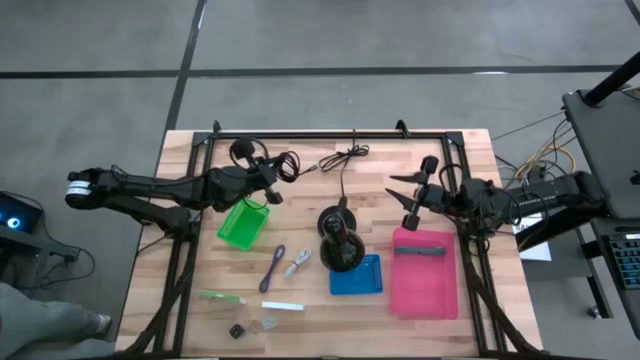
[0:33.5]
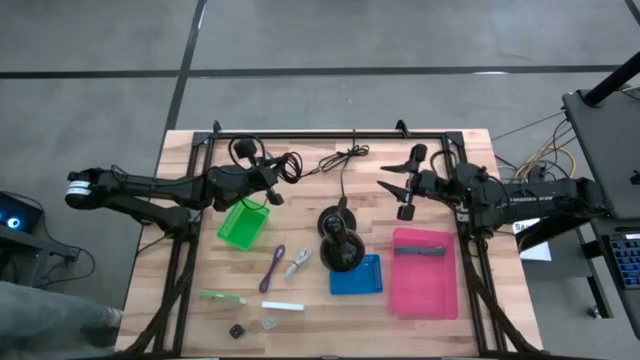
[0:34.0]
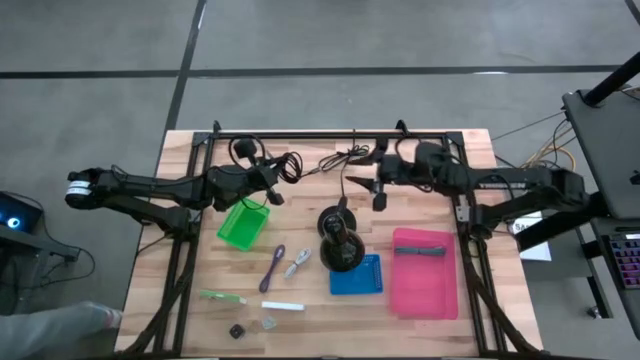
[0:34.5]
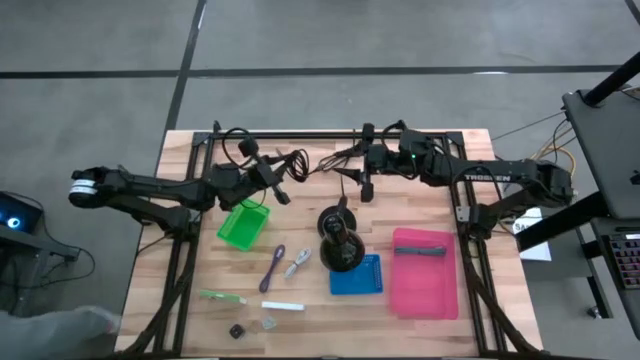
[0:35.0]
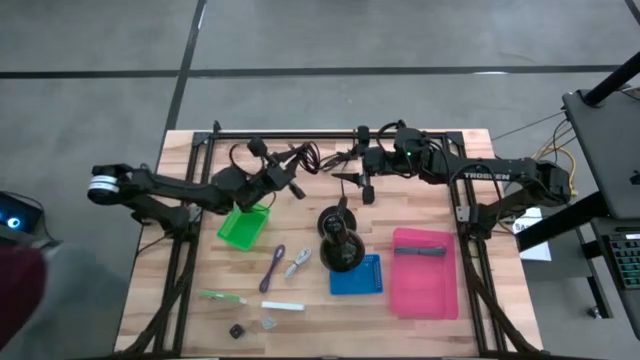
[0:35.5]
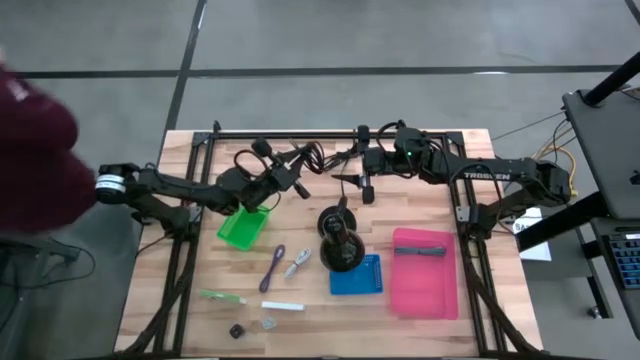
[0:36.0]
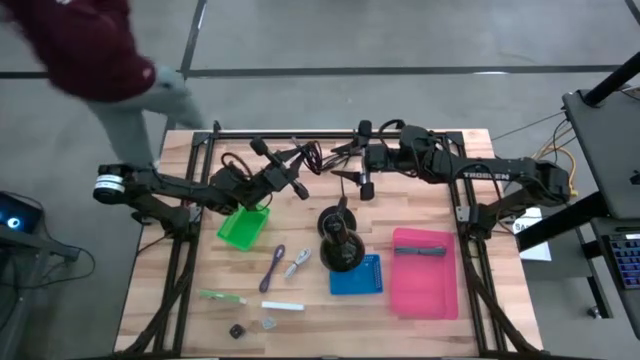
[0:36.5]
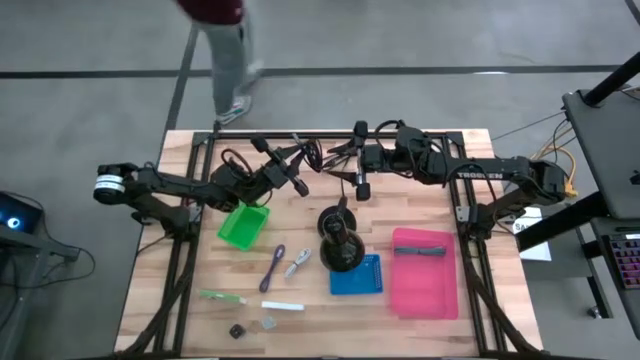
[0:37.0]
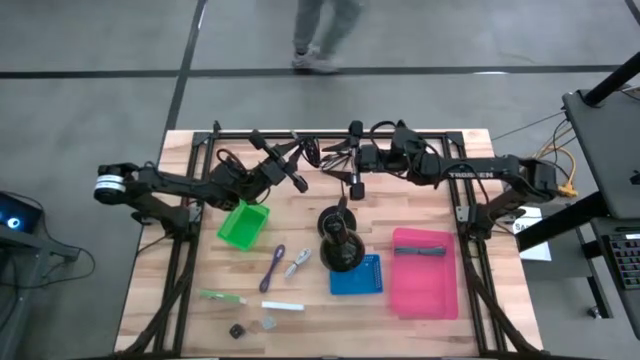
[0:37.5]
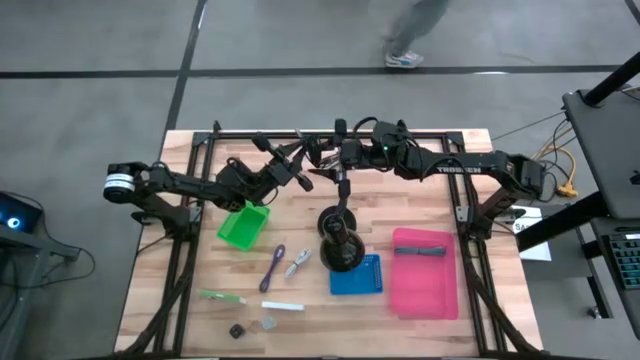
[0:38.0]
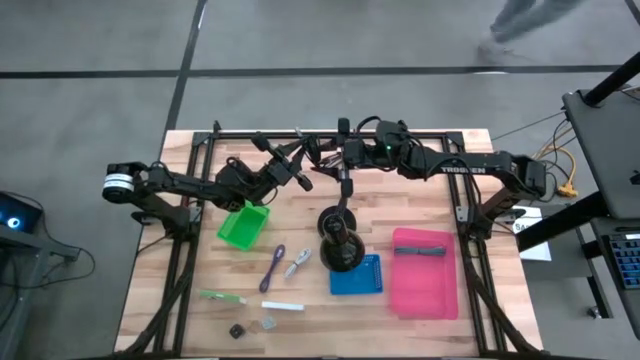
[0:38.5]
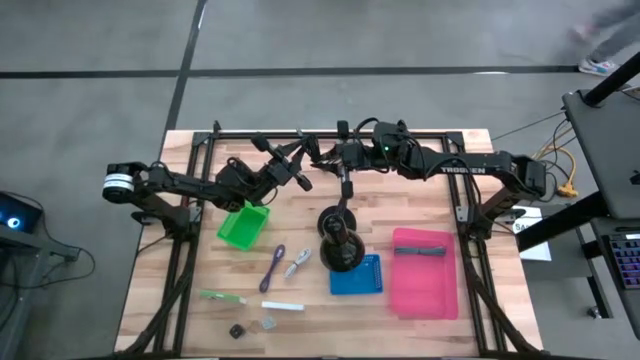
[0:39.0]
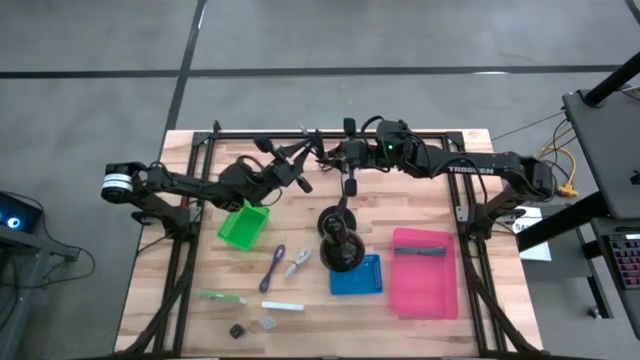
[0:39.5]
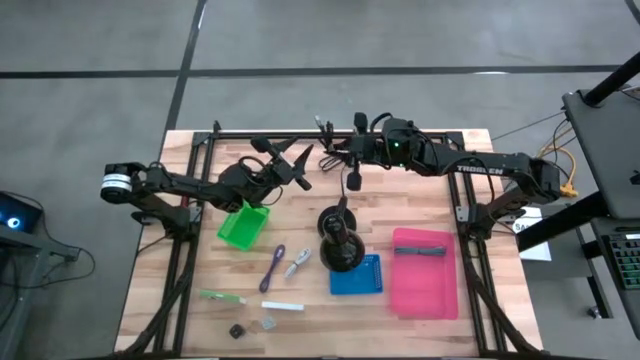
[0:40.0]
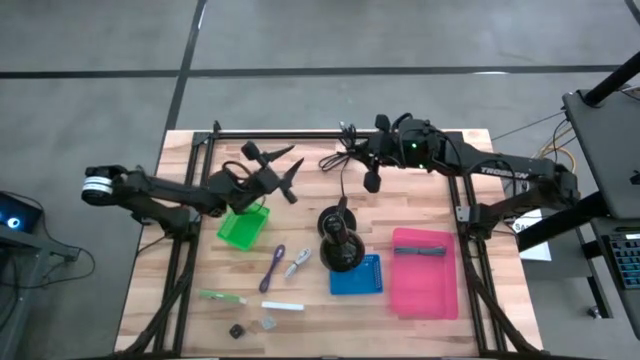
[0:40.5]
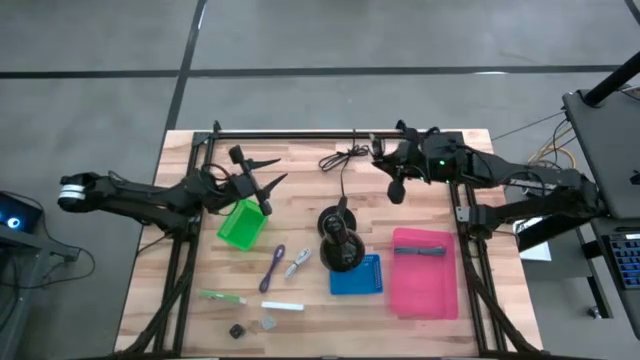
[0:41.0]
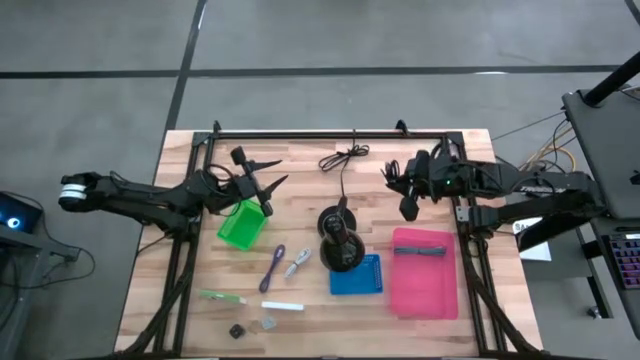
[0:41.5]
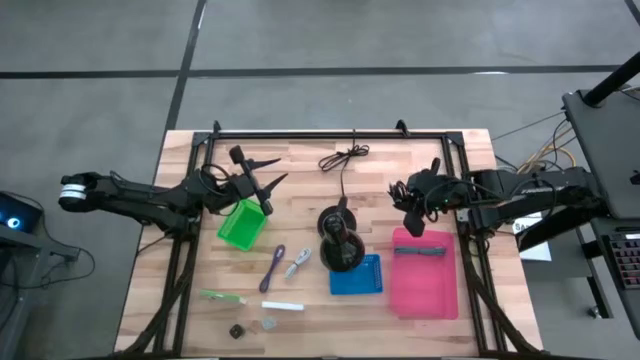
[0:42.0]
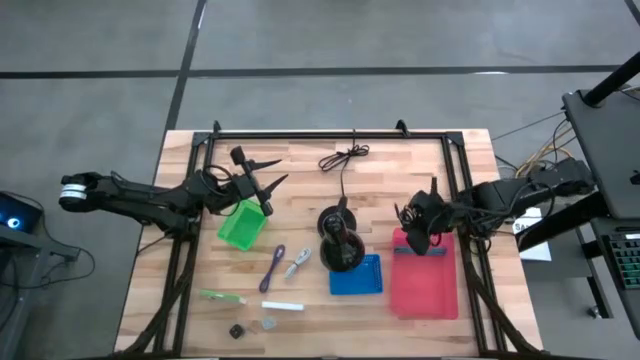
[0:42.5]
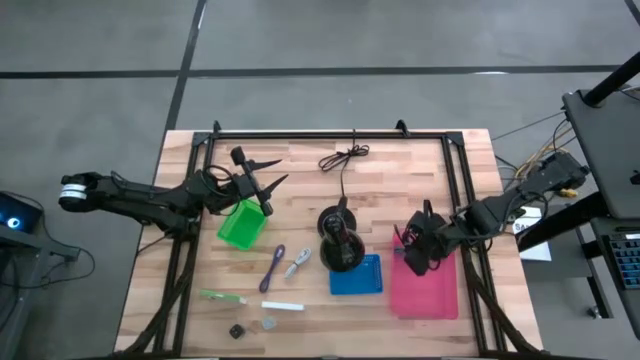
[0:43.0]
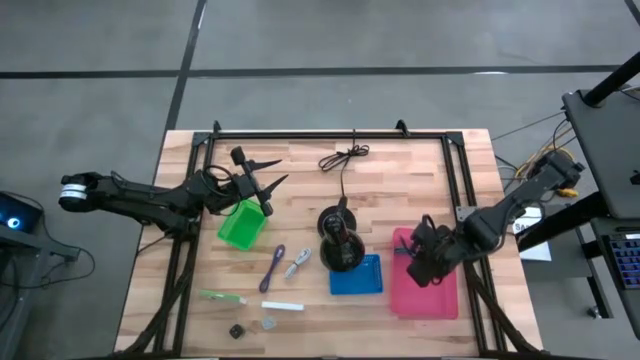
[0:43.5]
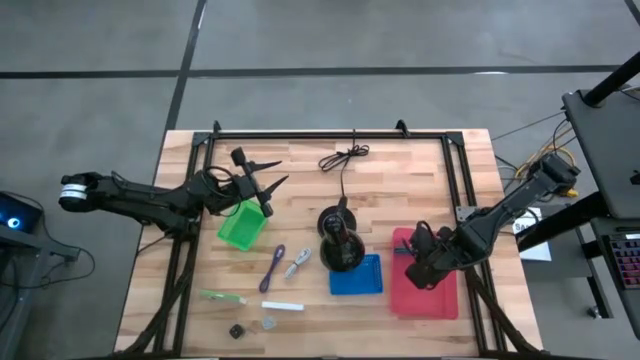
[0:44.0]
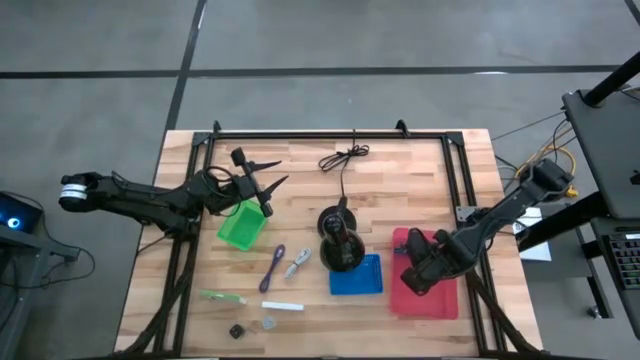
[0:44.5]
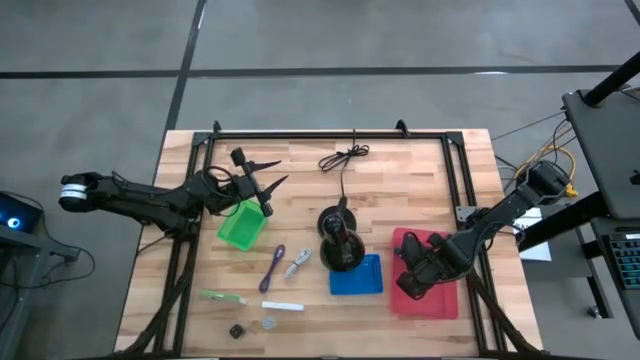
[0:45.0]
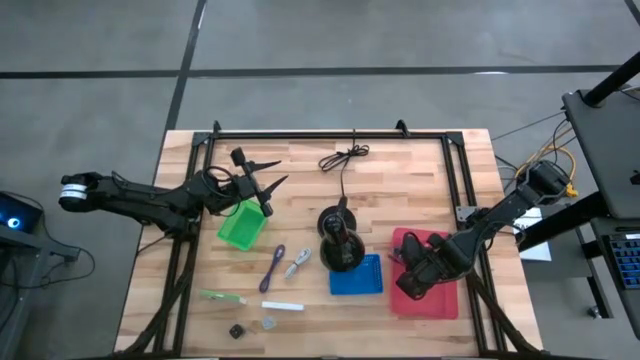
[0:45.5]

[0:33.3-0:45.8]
Task: Pick and place items into bin
Put the black charger cable into the pink bin

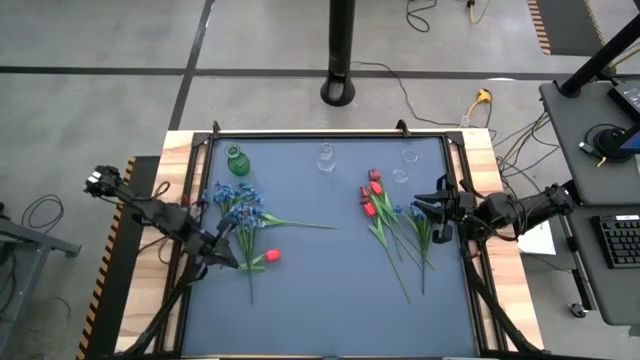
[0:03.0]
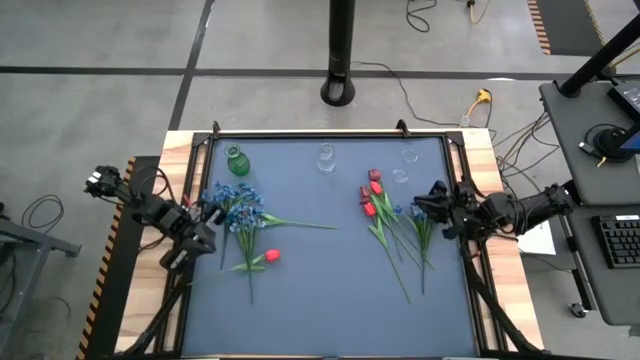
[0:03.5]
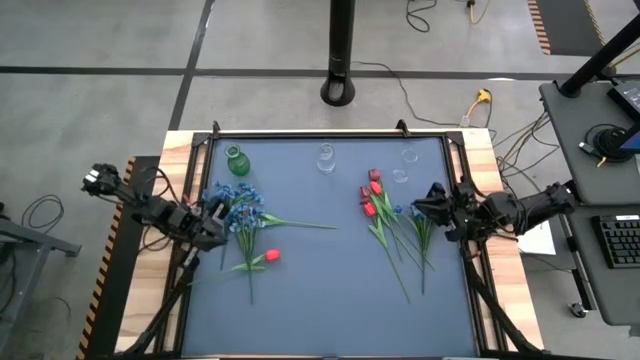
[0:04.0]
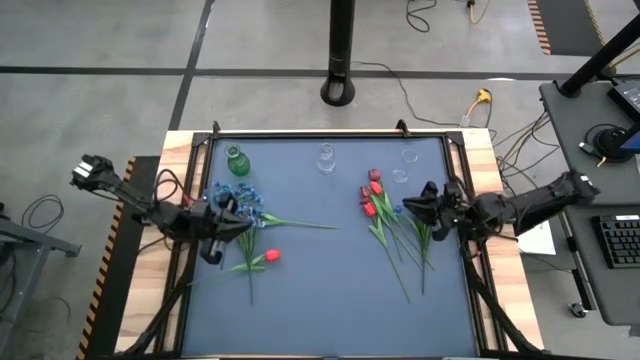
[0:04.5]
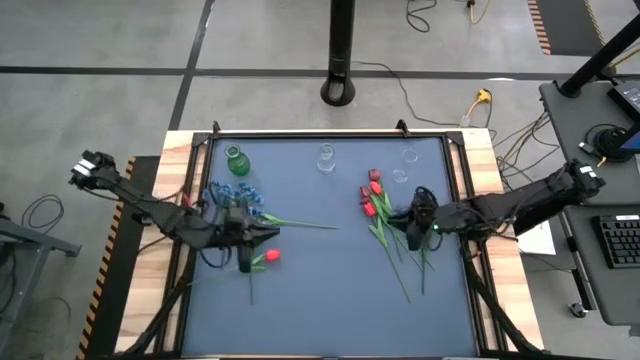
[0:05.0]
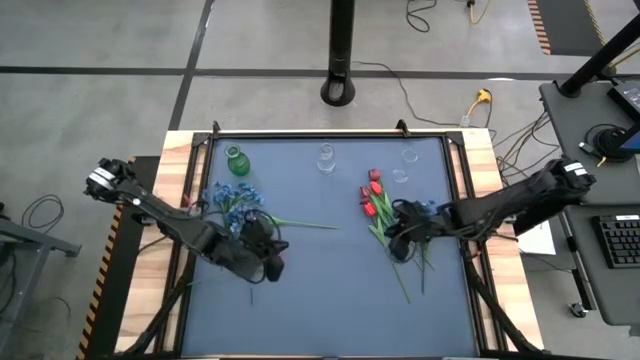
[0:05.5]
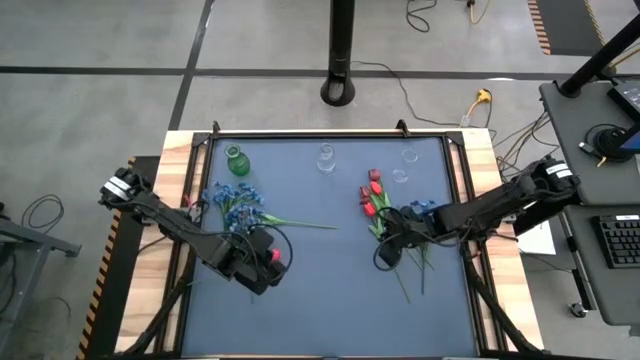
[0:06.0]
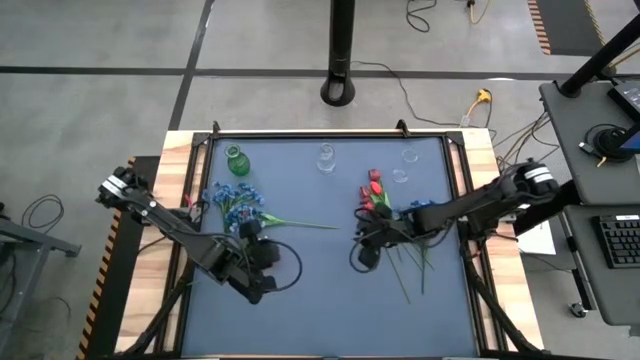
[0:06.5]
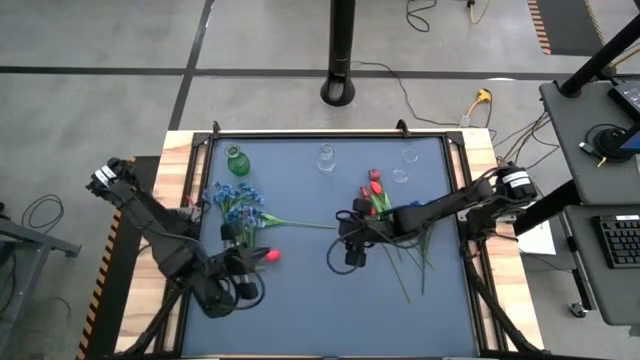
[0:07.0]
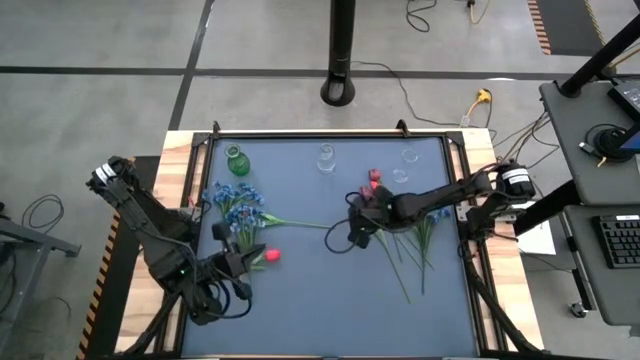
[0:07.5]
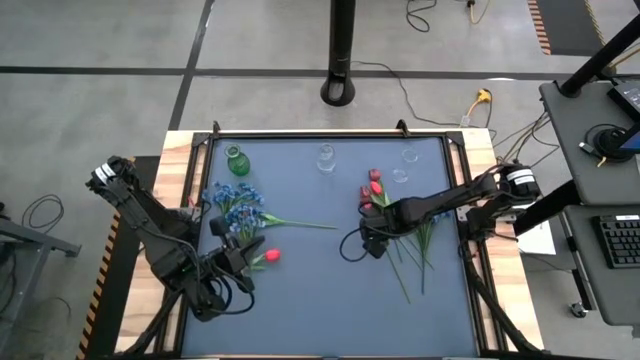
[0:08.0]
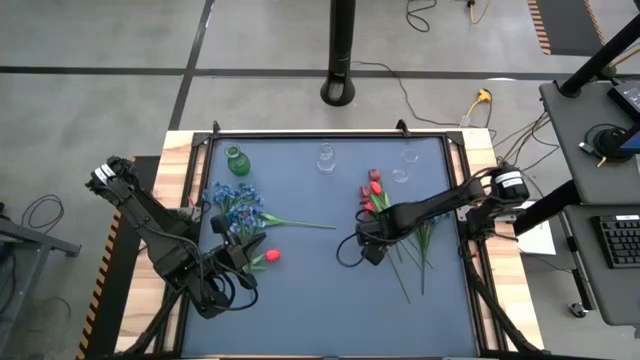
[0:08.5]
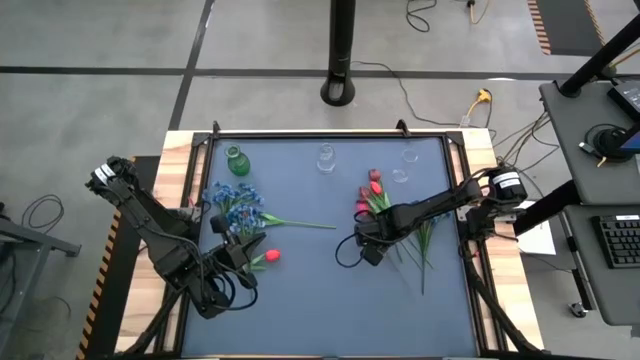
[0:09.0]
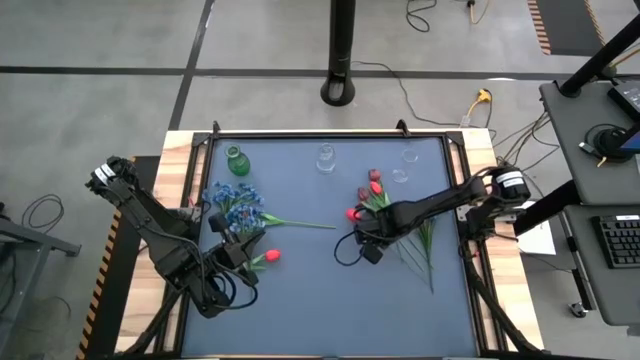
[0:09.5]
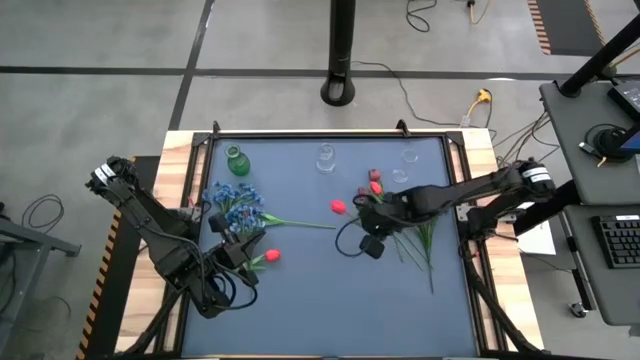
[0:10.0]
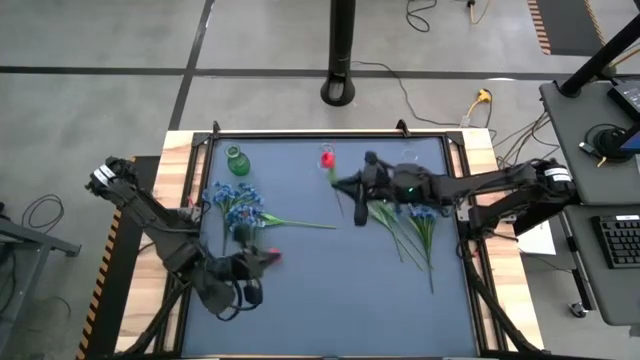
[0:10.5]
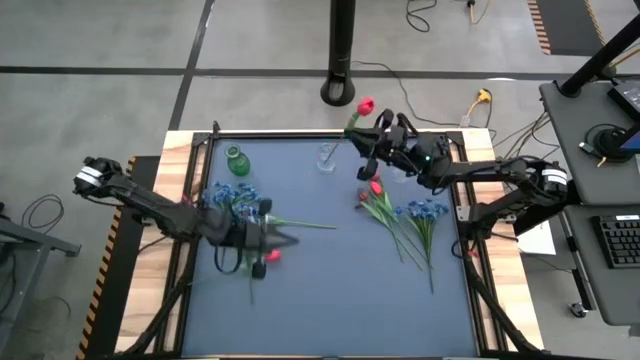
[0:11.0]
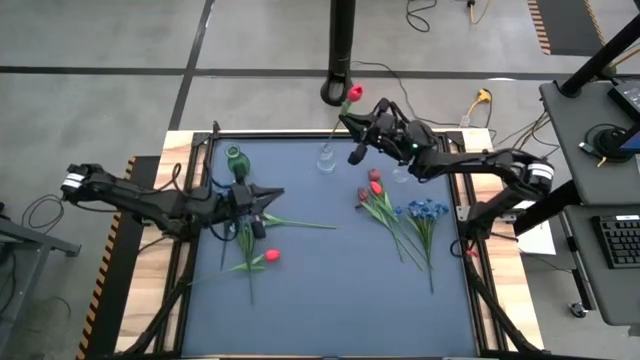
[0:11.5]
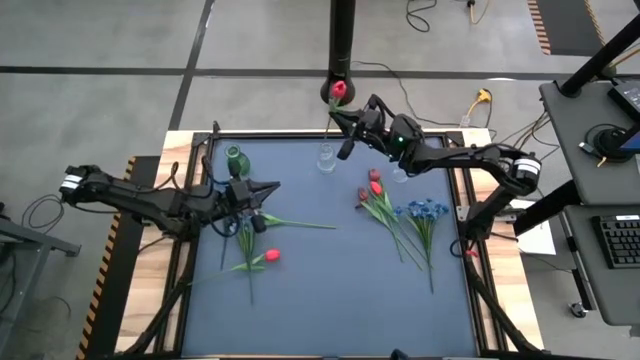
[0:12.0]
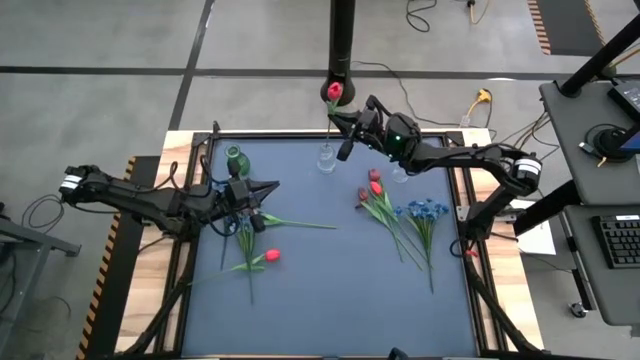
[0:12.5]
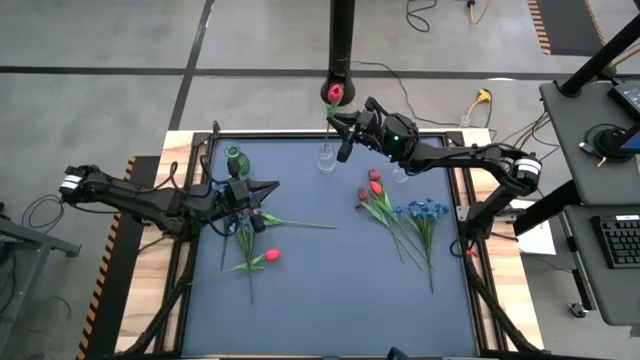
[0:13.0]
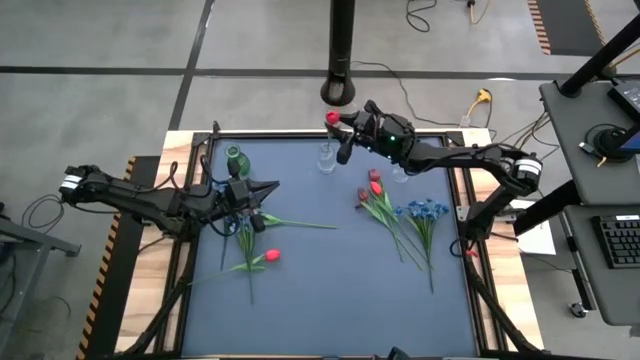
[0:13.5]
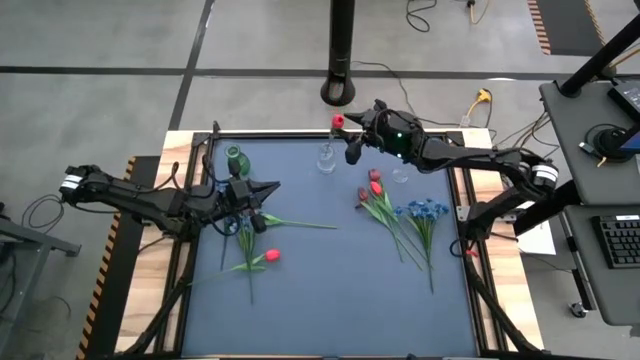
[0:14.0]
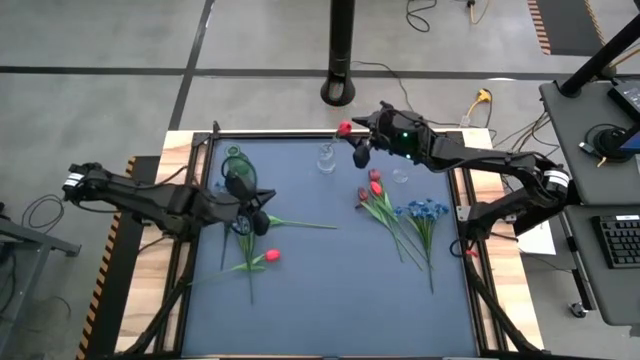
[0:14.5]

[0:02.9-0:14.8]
Task: Sort flowers into vase by color
Put the bottom right red flower into the left transparent vase
